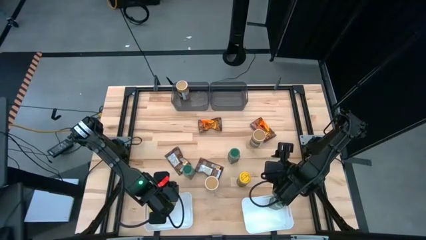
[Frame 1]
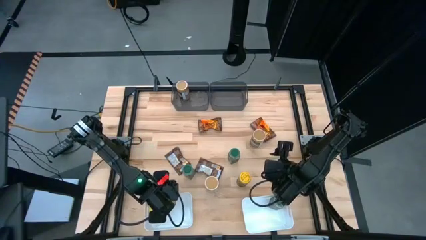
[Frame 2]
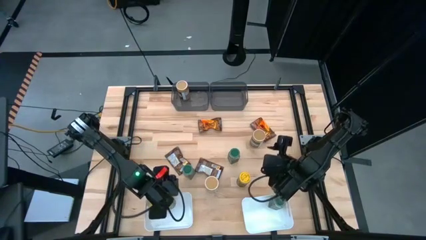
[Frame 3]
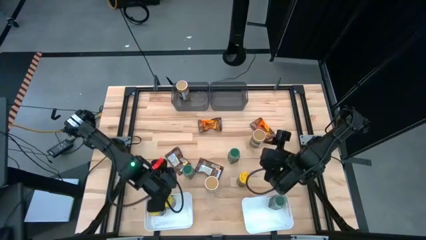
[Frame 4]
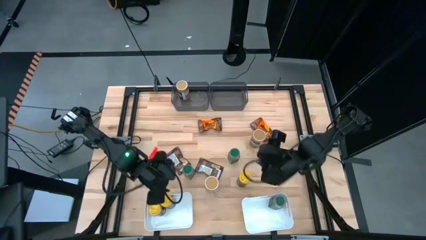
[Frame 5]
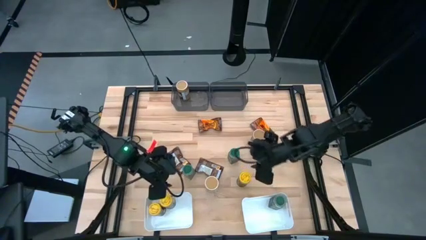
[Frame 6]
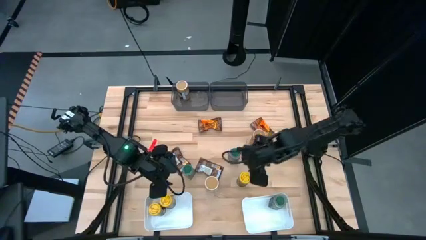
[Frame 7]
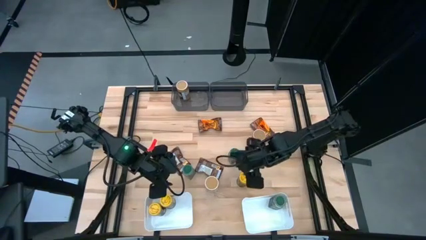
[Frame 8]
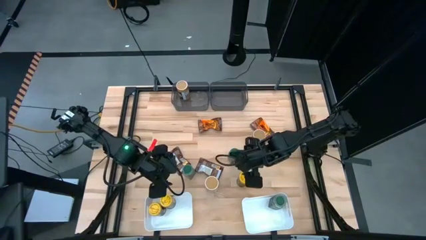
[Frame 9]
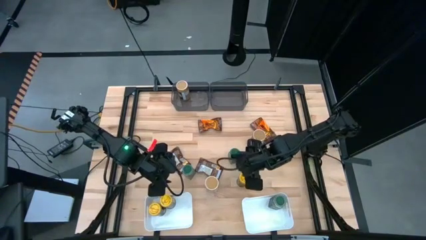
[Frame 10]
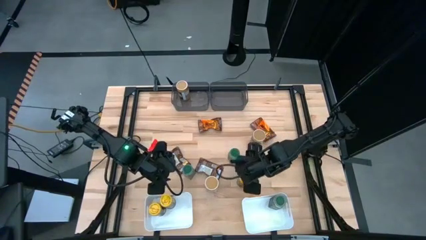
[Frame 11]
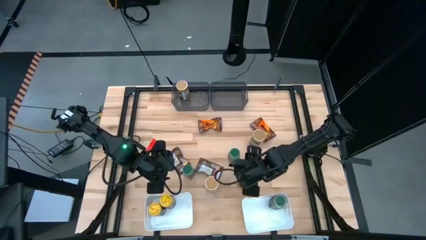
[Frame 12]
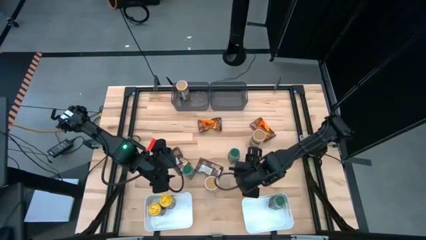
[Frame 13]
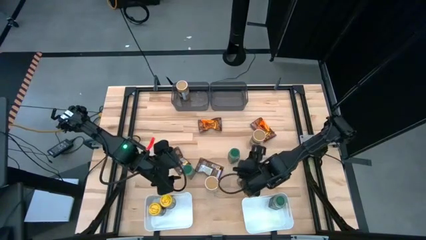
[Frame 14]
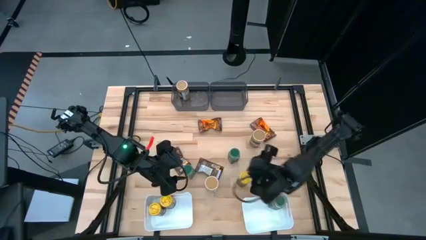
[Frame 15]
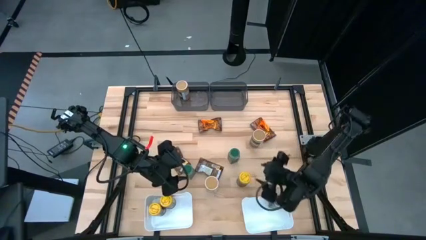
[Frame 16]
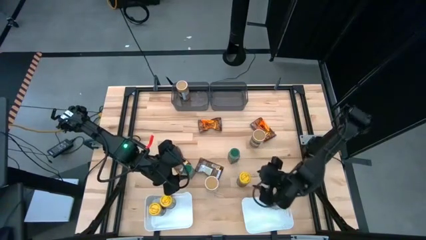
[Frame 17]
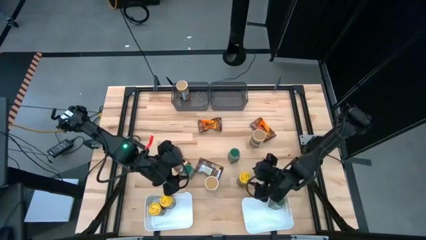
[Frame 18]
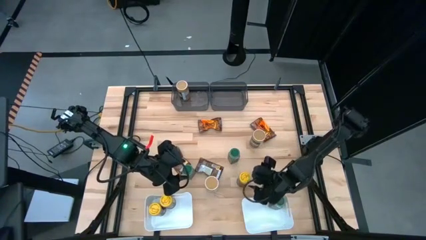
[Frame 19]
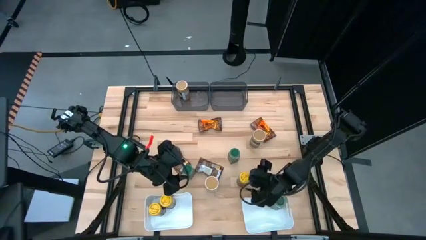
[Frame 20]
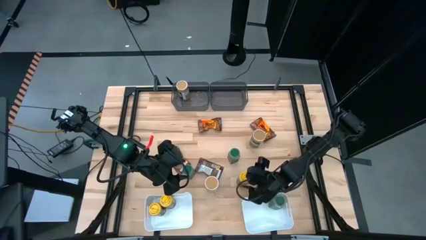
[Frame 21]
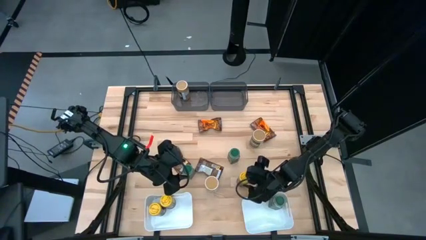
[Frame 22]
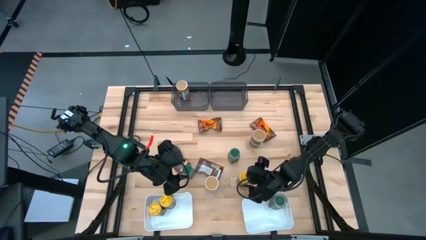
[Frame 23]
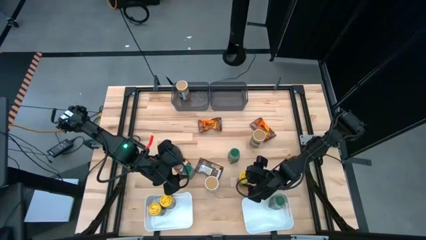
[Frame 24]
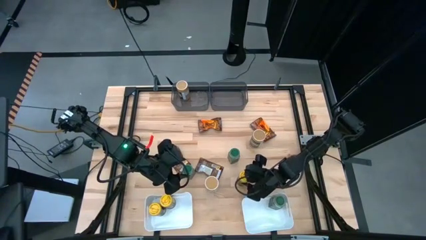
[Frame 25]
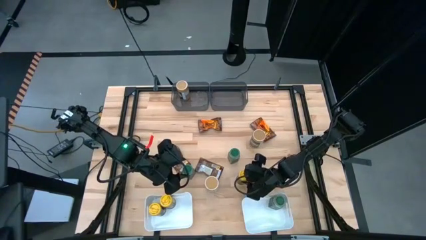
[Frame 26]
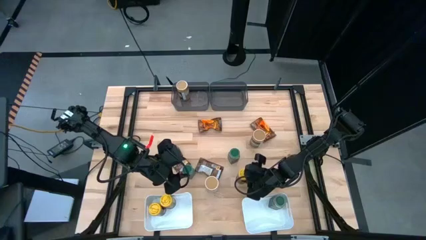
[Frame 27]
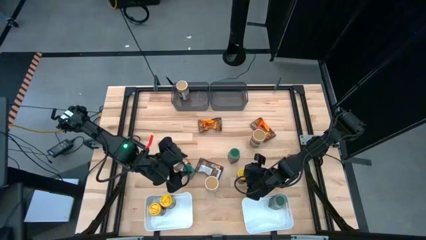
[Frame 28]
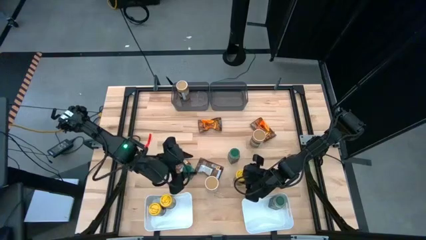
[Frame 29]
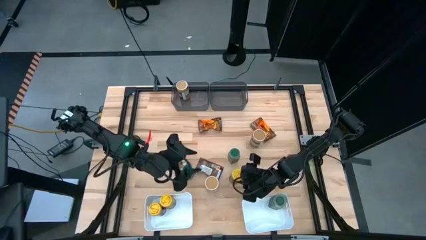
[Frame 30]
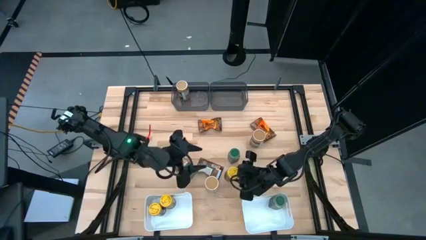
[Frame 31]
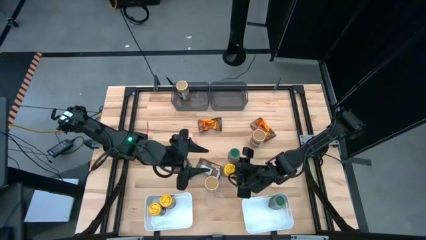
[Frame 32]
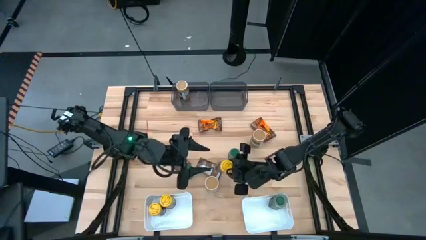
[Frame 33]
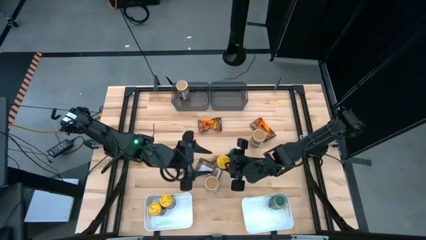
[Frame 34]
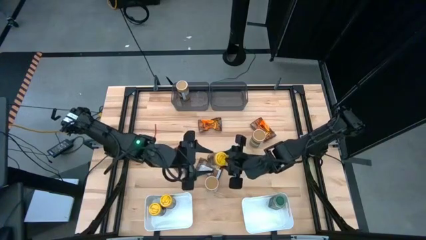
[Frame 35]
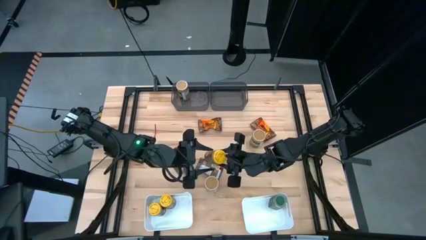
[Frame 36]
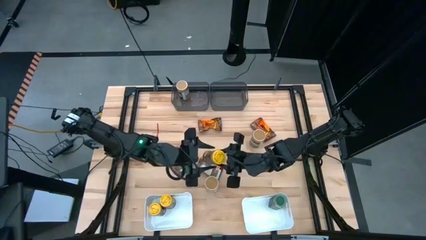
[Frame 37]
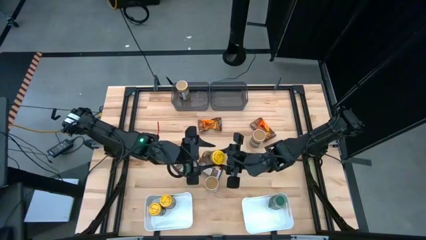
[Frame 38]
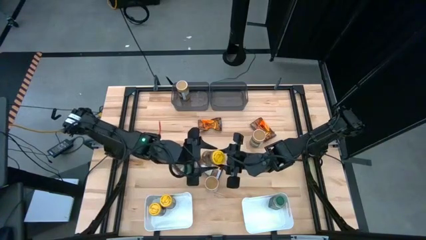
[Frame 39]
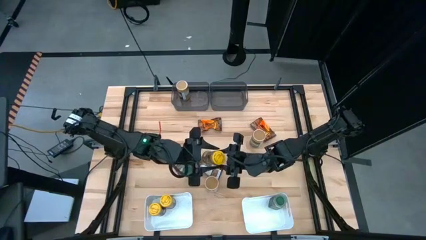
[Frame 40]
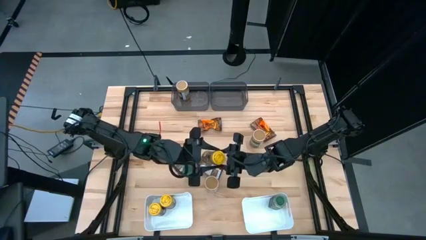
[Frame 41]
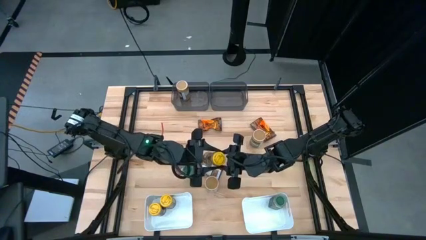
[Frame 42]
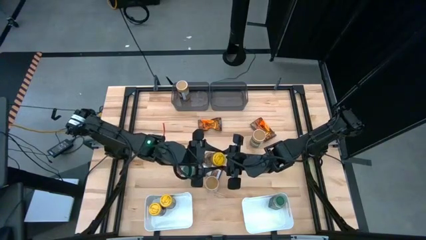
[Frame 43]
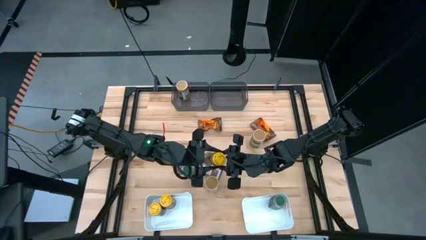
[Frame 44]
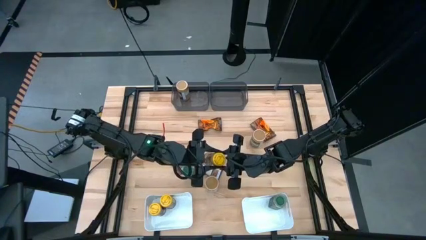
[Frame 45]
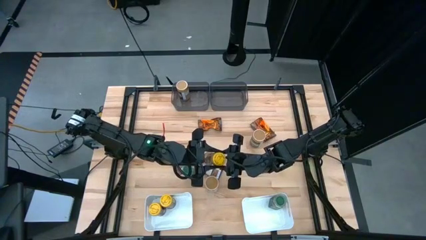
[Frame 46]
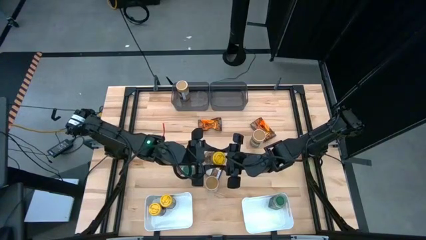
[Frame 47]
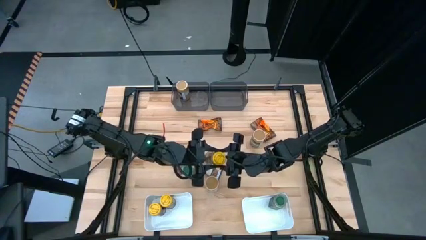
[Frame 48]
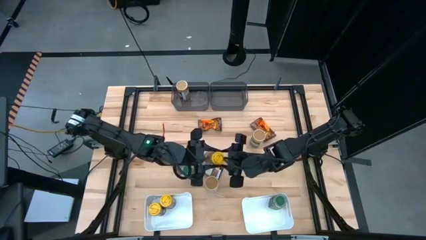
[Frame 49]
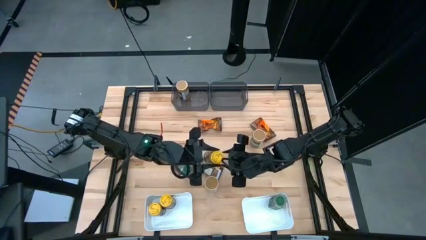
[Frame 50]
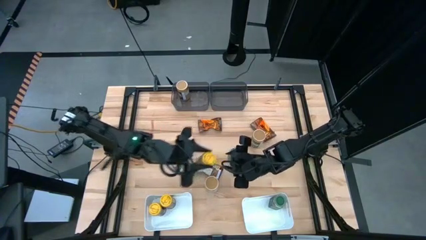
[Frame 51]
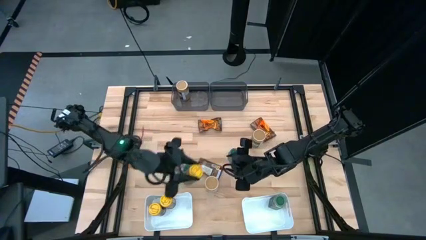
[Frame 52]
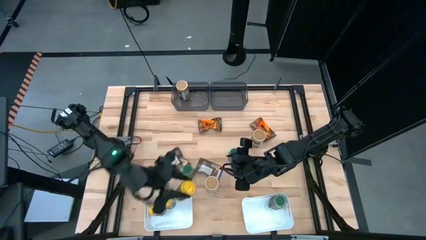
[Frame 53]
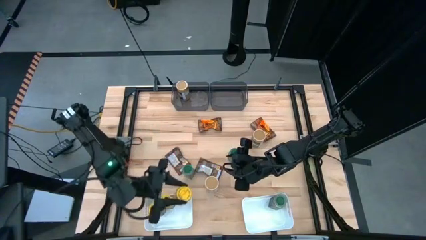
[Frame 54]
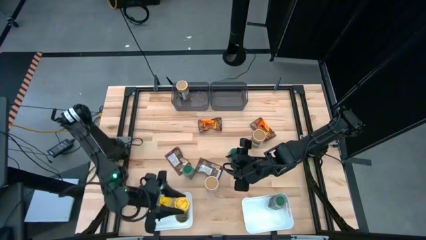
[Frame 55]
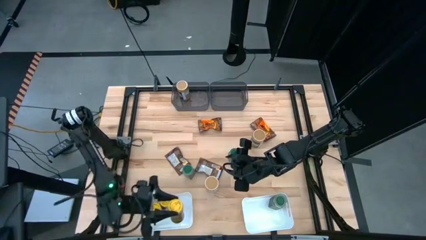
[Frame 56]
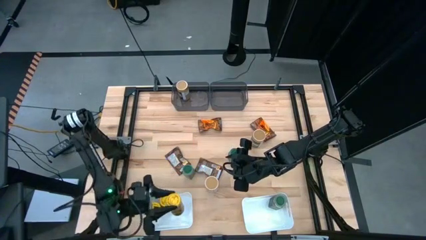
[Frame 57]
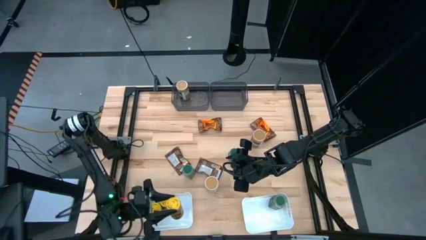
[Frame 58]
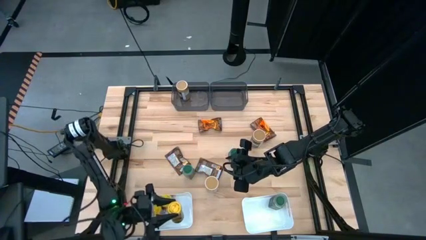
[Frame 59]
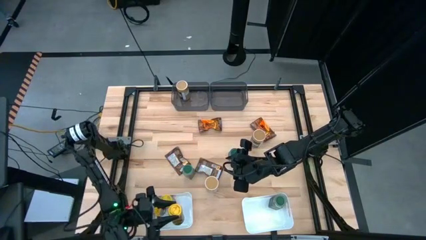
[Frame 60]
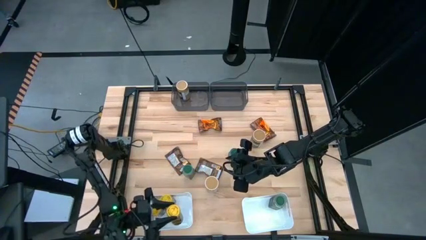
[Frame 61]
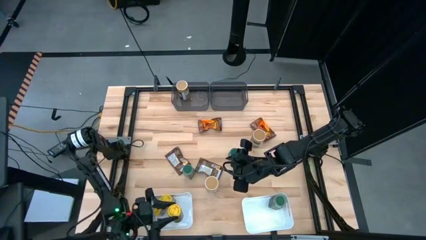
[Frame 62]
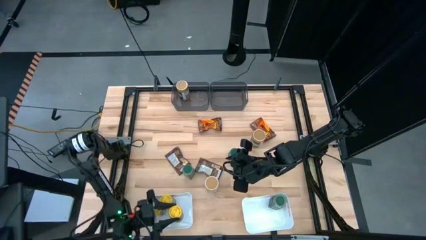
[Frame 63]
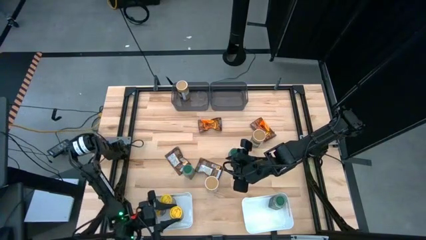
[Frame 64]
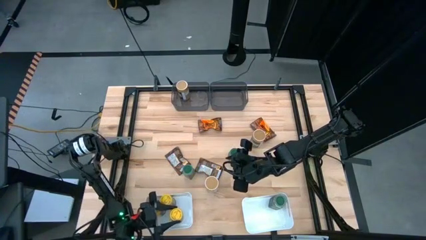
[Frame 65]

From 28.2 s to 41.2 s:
Task: Sort spices by type
Put the yellow seasoning bottle into the left white bin

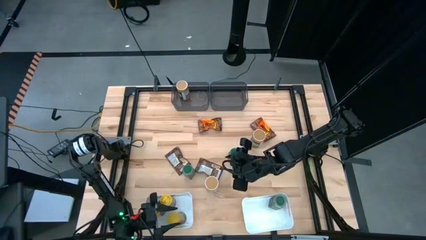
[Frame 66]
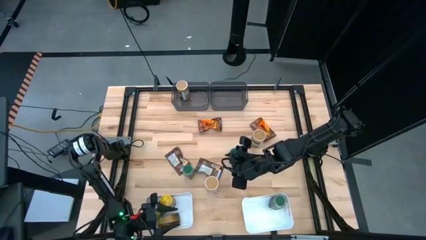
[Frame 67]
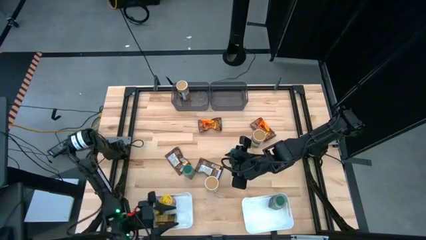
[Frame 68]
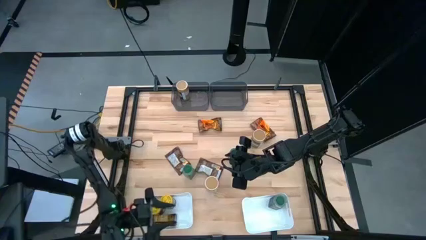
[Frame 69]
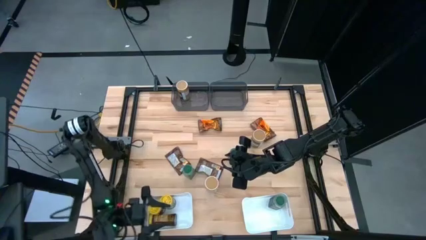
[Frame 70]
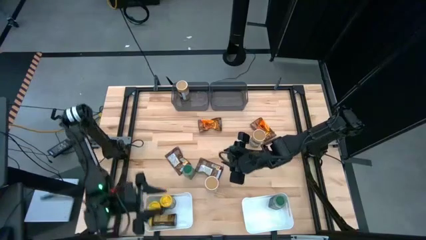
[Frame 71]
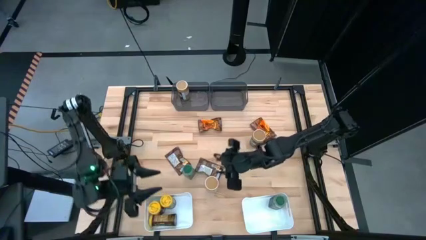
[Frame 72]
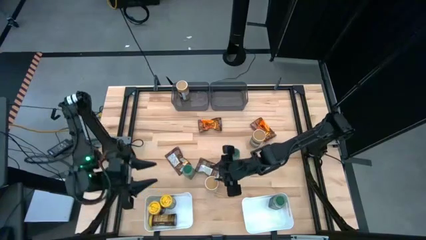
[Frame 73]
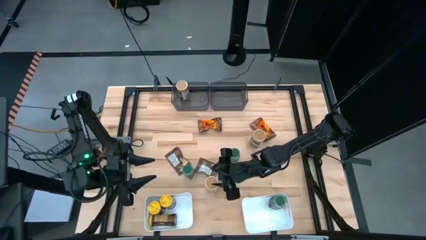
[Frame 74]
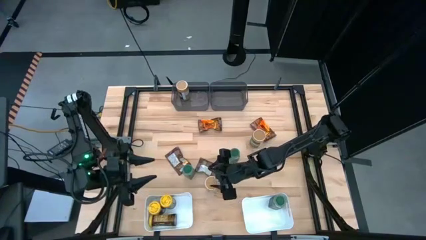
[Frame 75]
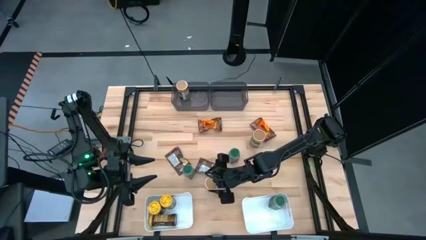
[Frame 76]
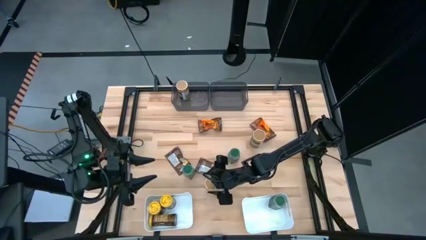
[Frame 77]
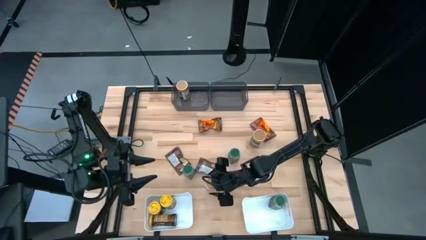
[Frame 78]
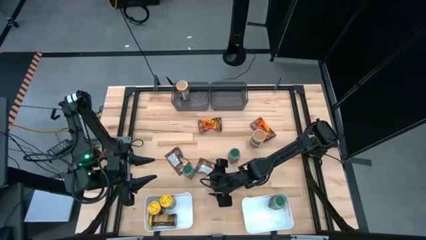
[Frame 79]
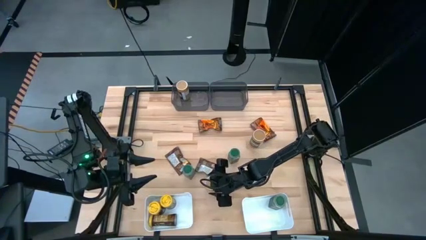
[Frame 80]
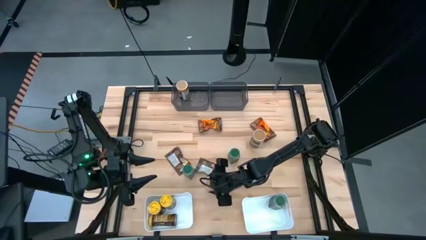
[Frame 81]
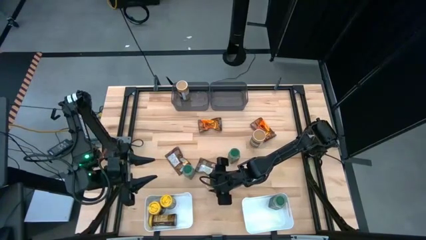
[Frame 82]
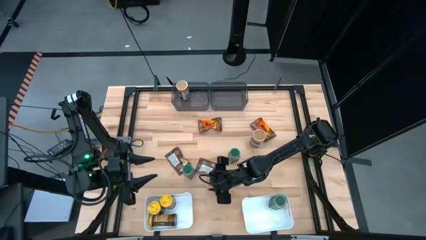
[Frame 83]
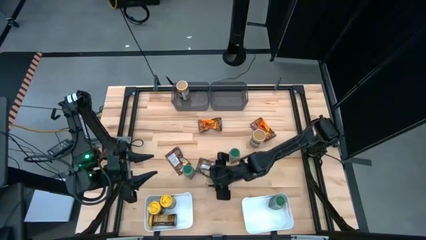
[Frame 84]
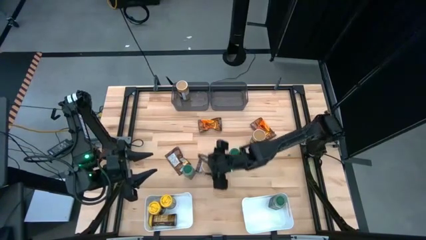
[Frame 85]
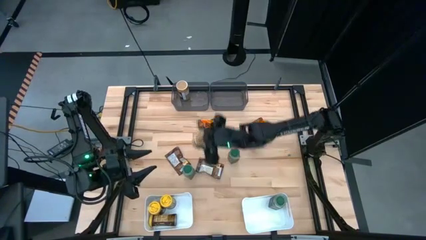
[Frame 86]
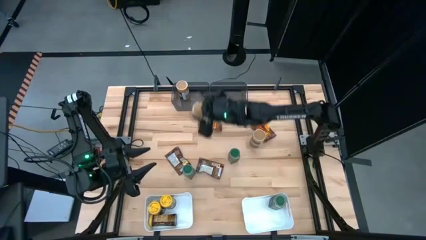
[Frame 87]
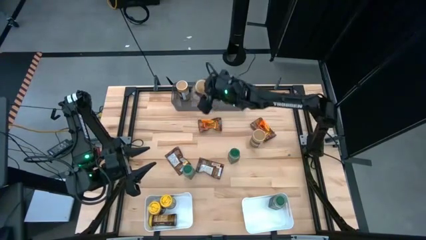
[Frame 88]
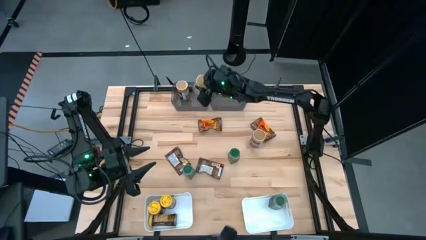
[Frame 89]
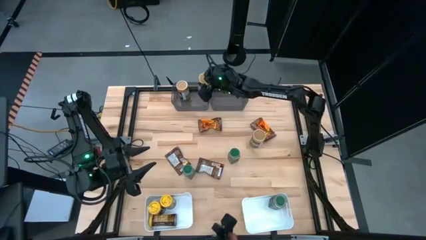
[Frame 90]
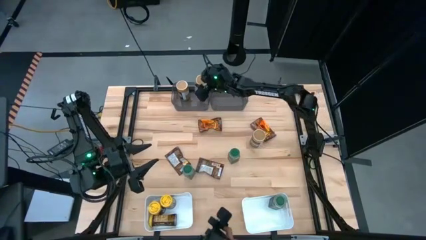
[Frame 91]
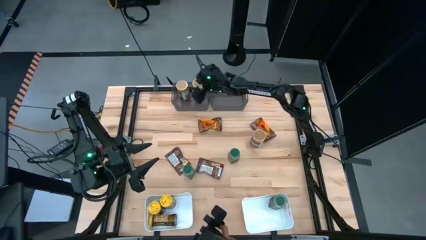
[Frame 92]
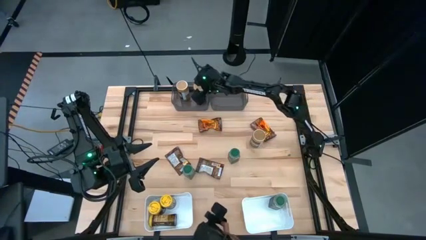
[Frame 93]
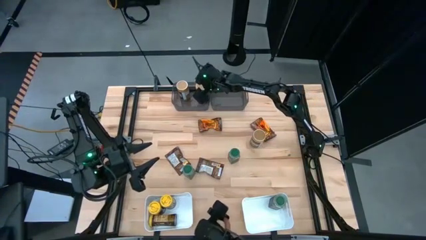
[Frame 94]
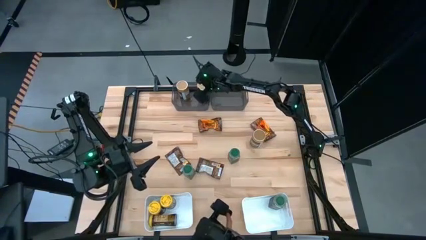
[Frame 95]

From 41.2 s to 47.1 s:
Put the bottom golden seasoning bottle into the left black bin
